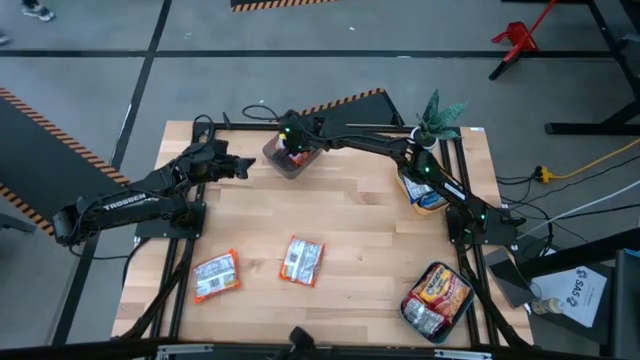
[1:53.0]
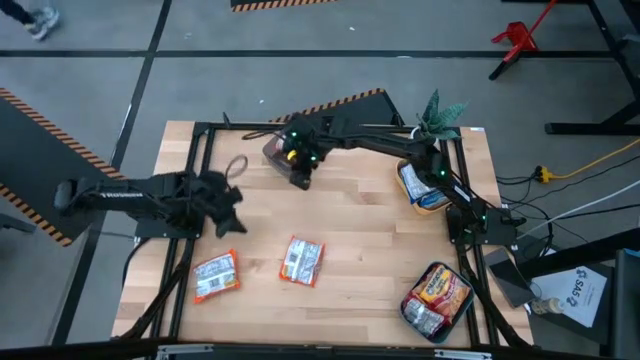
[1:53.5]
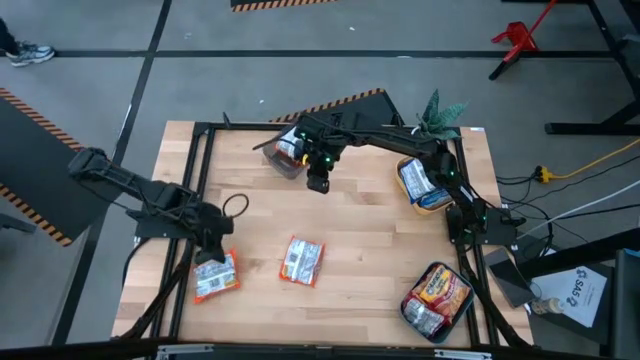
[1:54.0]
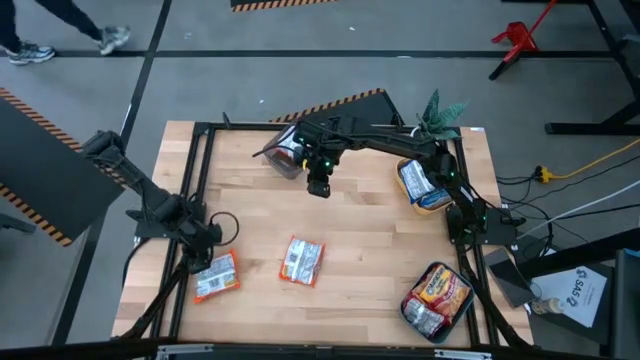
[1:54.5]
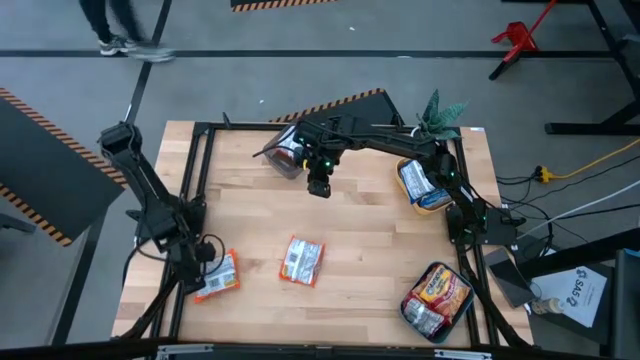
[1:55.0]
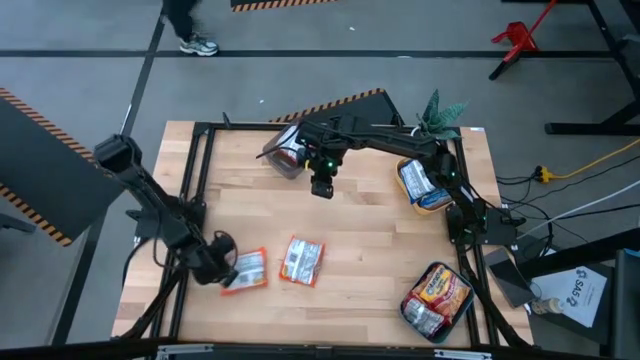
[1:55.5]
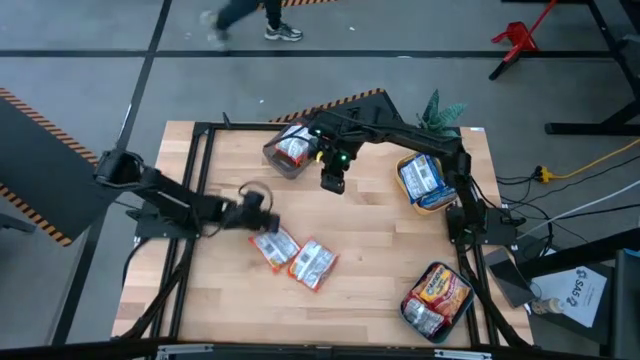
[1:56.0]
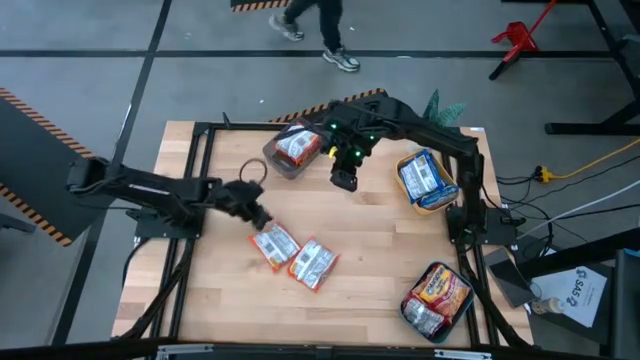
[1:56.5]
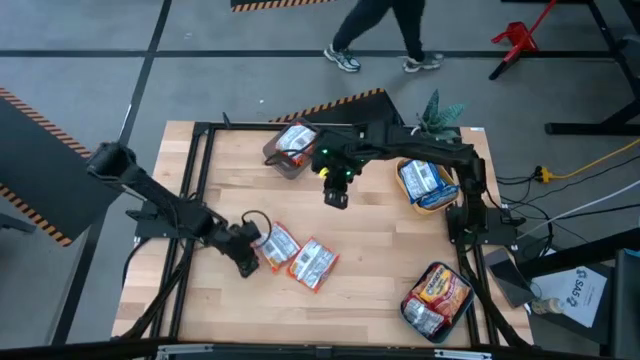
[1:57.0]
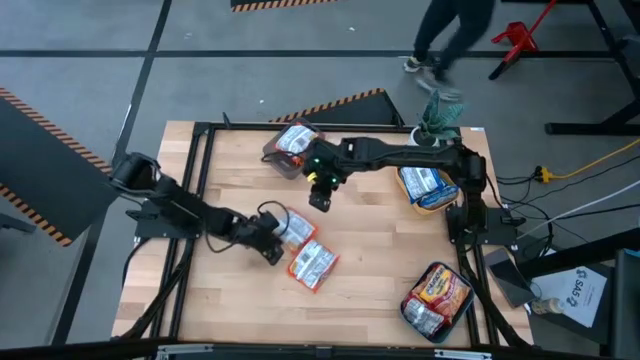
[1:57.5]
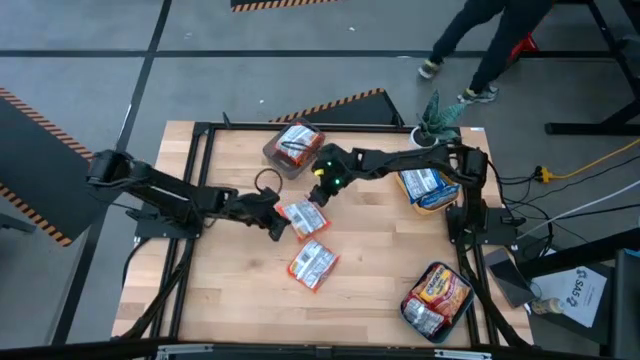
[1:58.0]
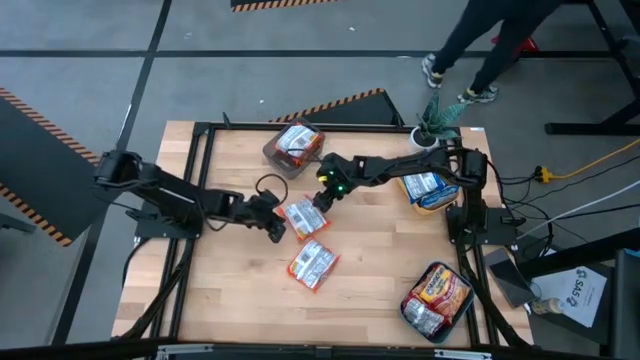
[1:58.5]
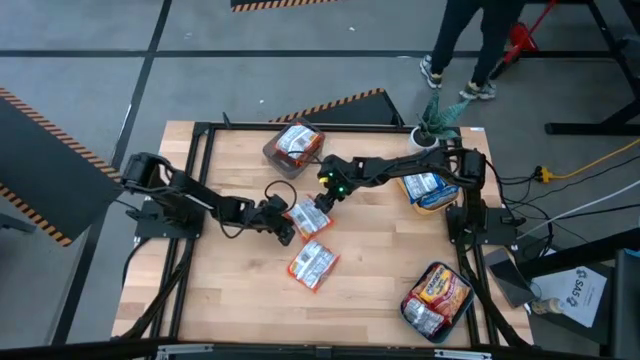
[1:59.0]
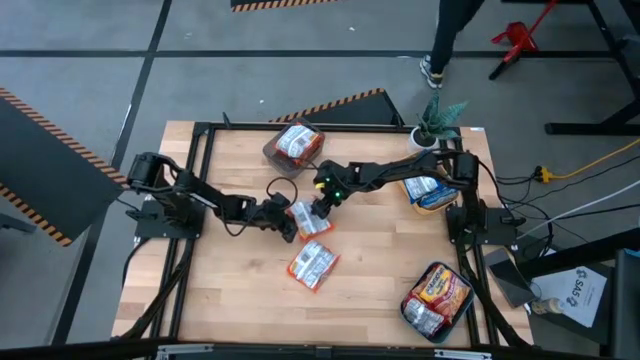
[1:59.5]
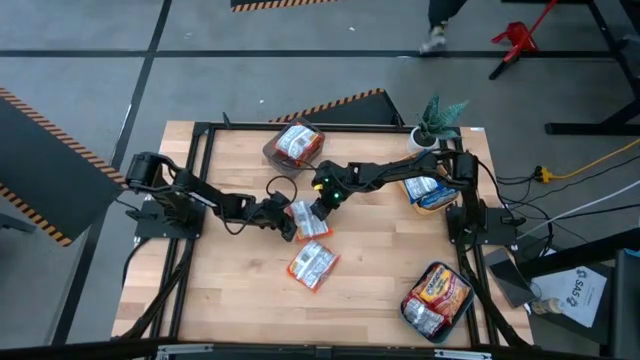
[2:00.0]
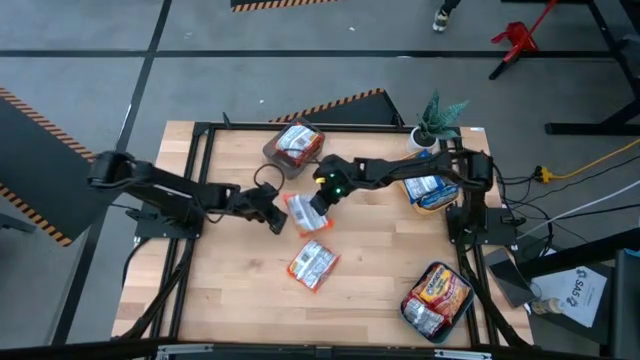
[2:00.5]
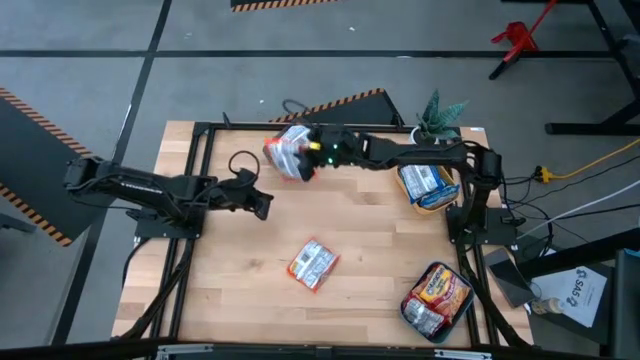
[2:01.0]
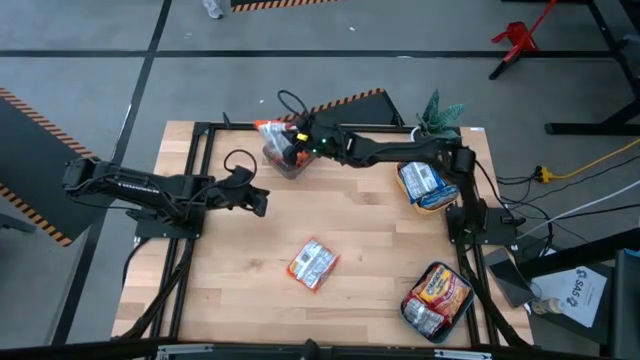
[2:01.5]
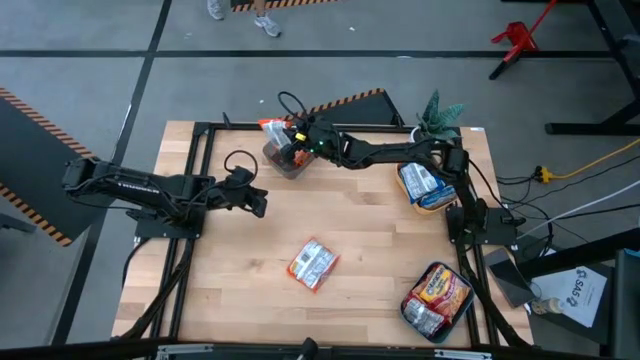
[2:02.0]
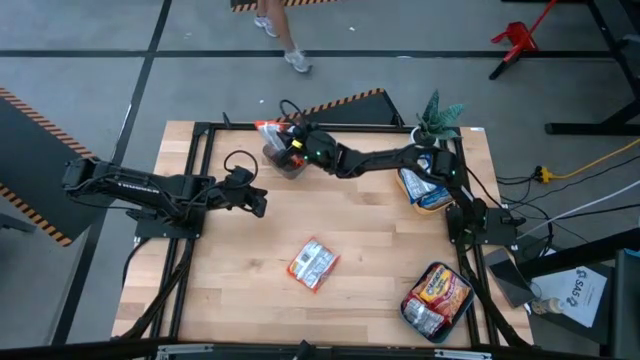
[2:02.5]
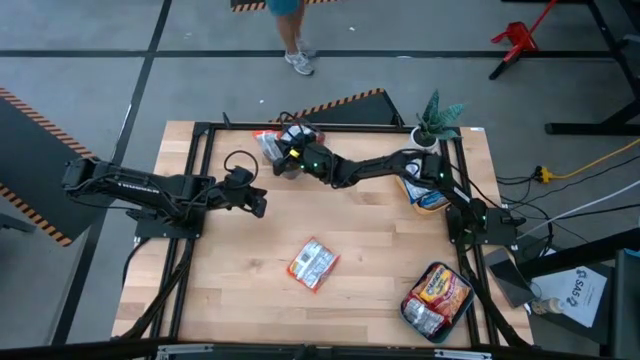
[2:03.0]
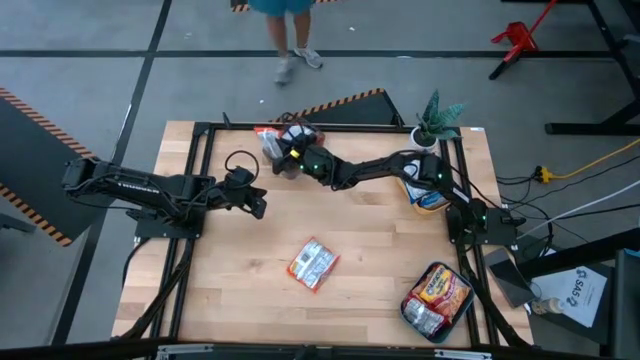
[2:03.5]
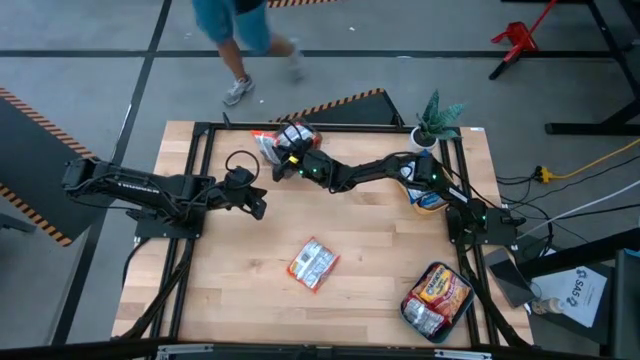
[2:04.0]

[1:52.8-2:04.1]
Task: Sort Maruchan noodles
Put the orange noodle pack into the gray bin

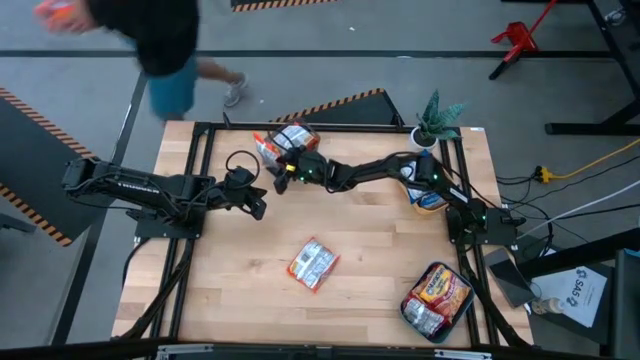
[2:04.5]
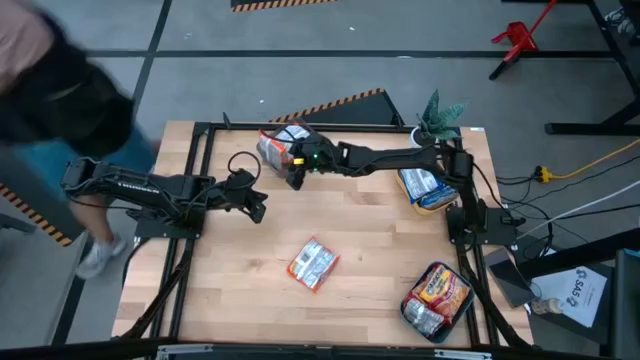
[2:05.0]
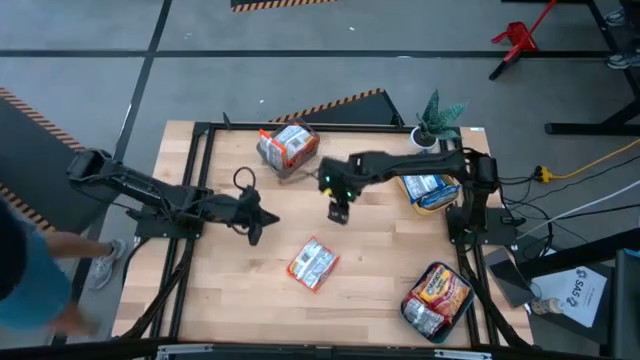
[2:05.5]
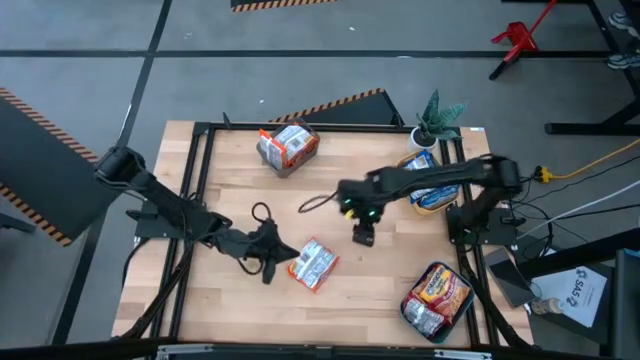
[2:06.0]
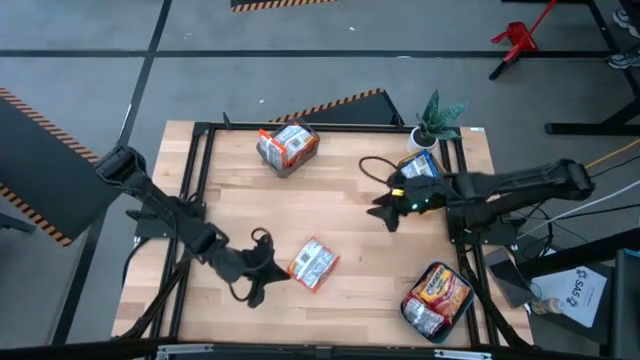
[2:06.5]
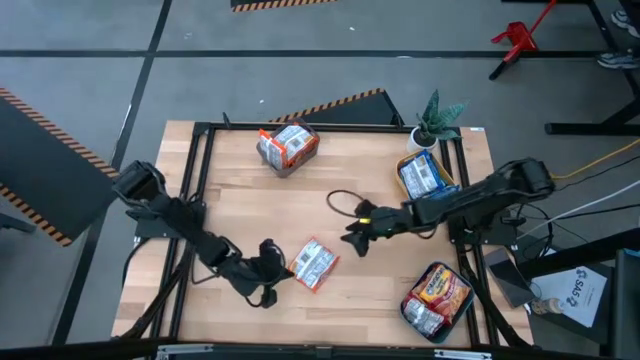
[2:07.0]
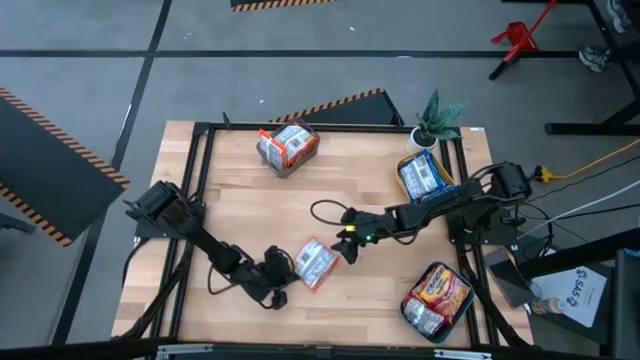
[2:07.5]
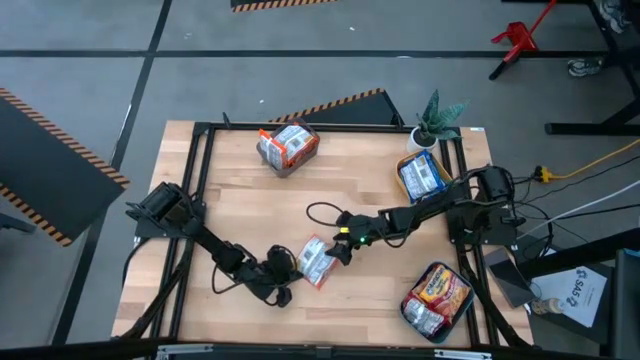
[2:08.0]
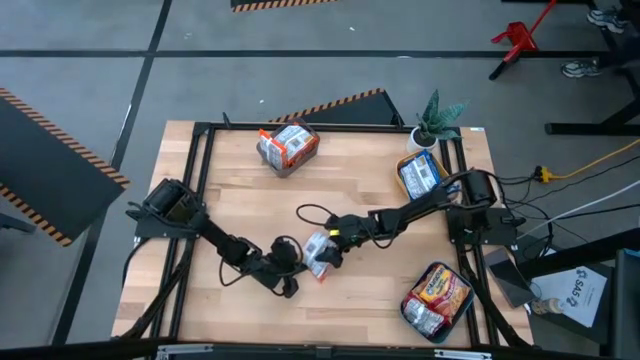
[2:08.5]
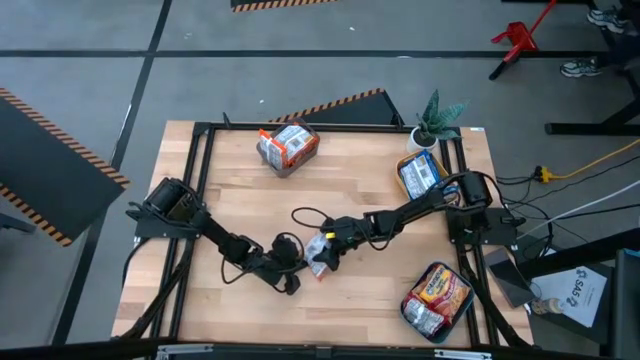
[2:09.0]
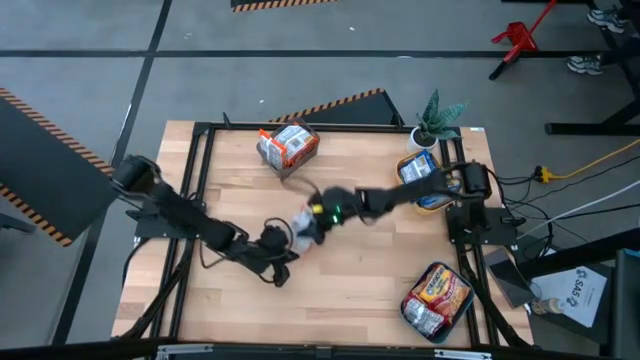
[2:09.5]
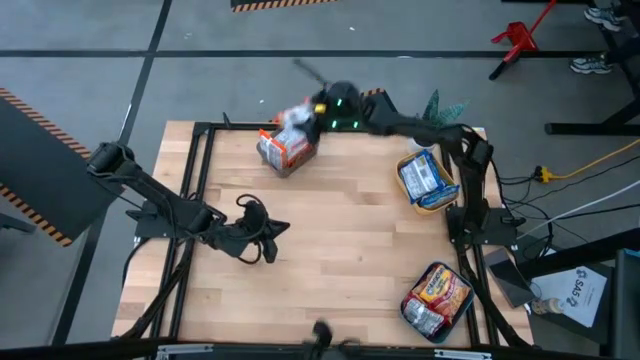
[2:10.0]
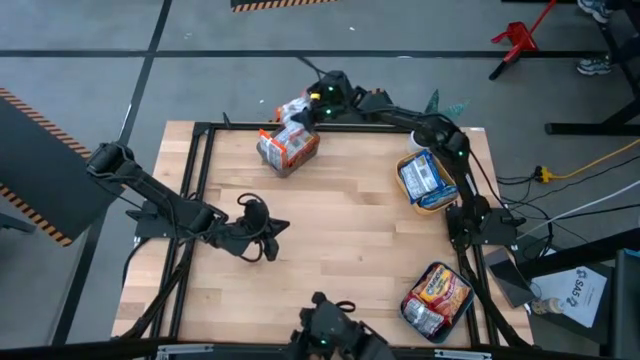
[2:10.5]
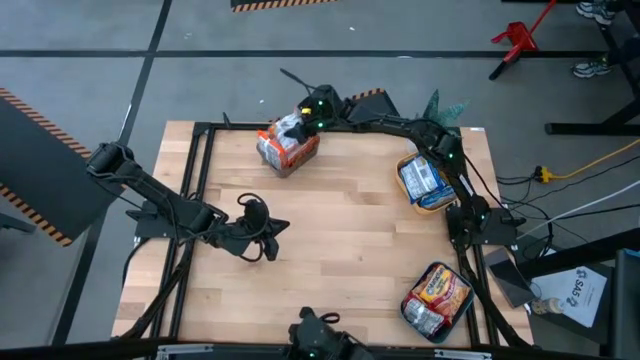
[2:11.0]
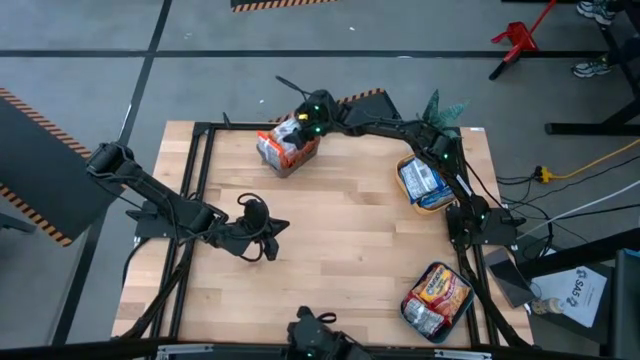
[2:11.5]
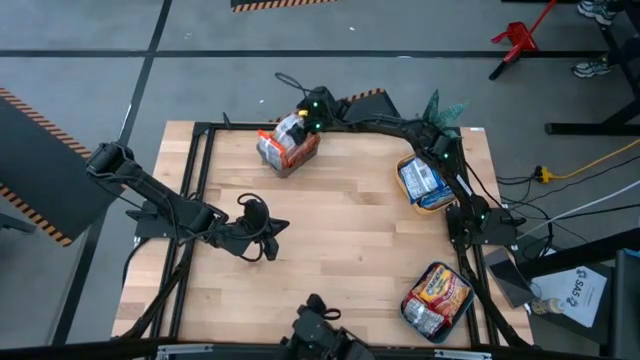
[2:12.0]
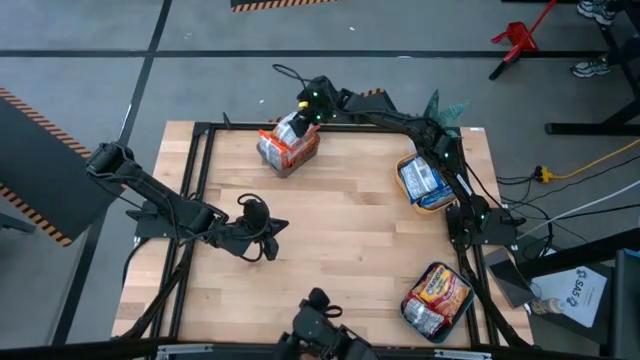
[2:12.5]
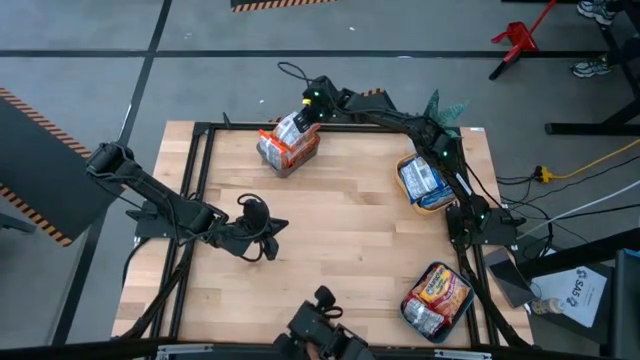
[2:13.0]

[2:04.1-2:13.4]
Put the orange noodle pack into the gray bin
